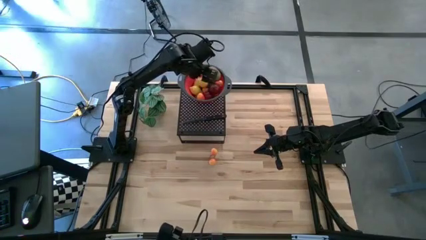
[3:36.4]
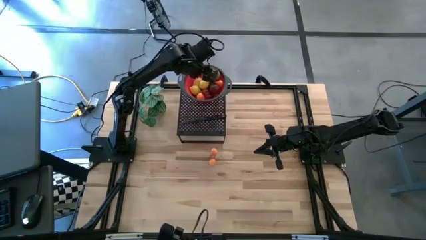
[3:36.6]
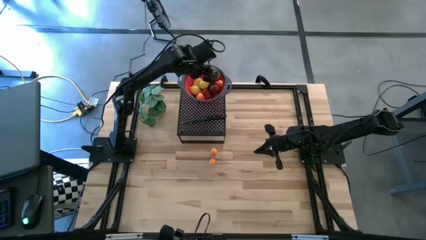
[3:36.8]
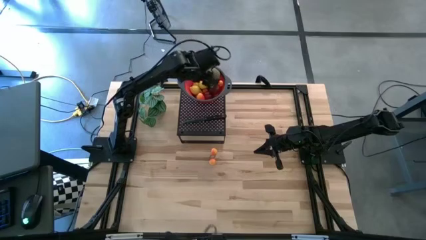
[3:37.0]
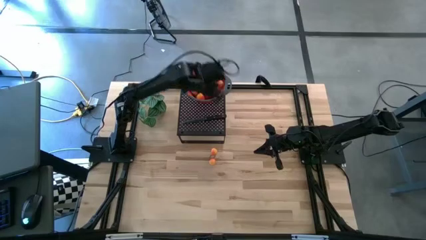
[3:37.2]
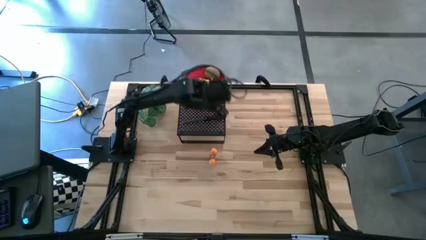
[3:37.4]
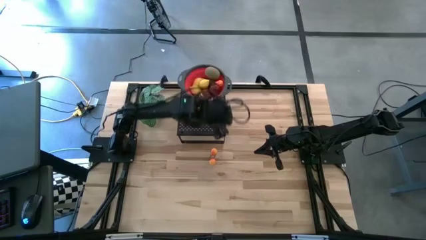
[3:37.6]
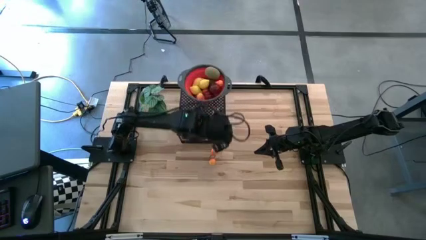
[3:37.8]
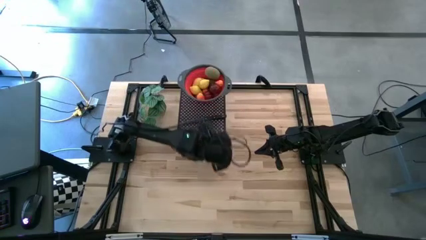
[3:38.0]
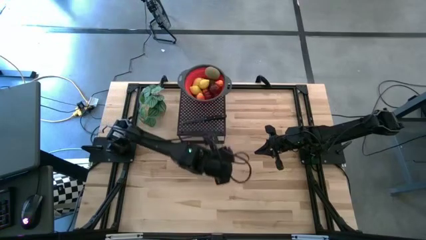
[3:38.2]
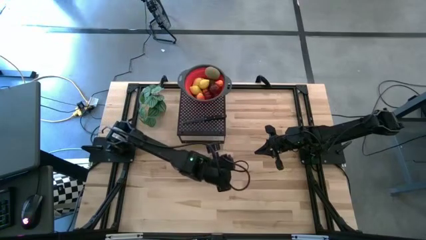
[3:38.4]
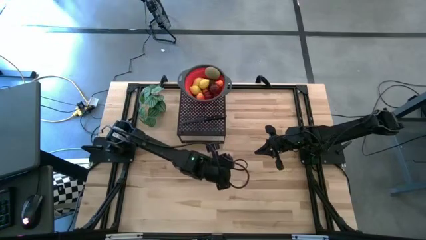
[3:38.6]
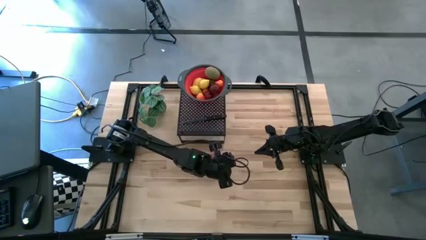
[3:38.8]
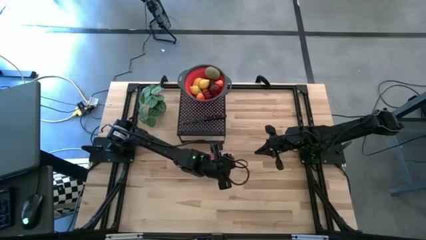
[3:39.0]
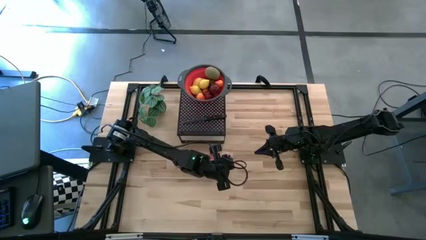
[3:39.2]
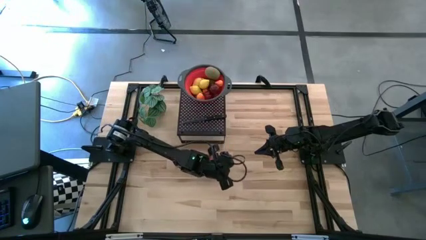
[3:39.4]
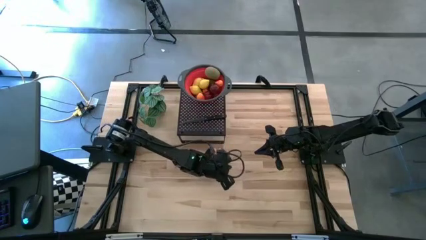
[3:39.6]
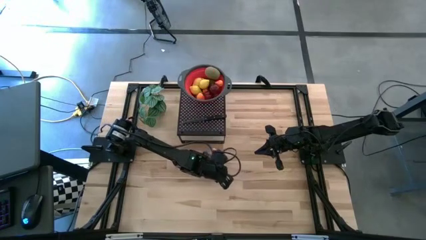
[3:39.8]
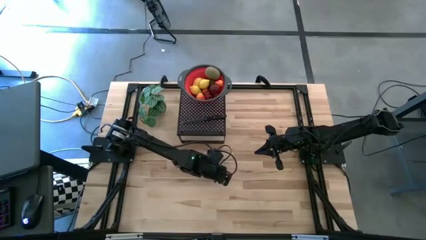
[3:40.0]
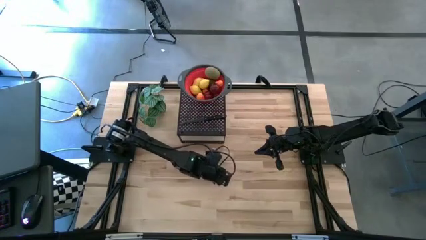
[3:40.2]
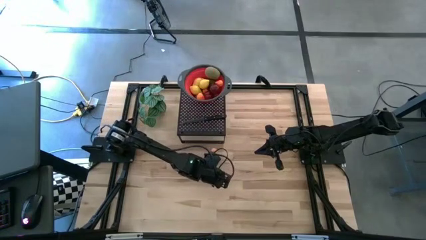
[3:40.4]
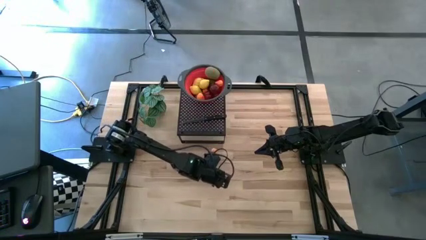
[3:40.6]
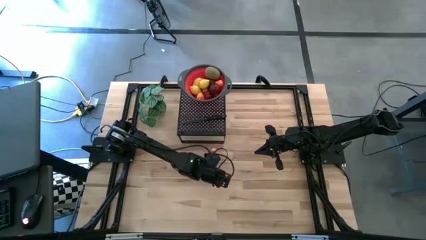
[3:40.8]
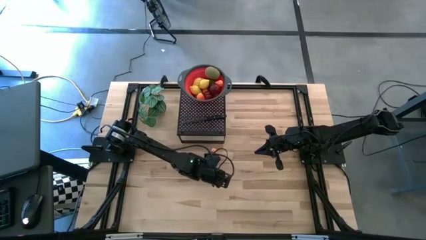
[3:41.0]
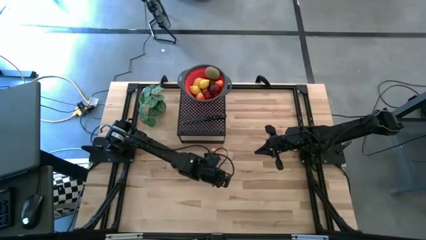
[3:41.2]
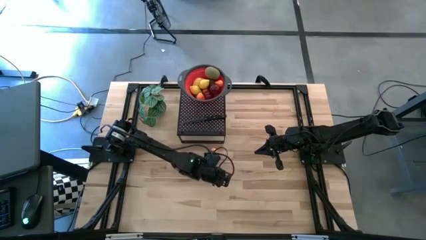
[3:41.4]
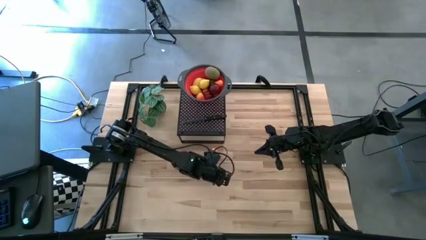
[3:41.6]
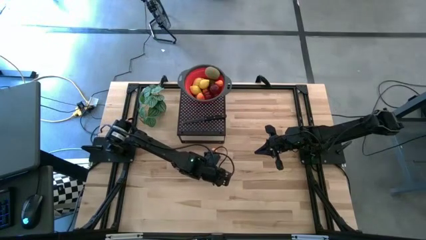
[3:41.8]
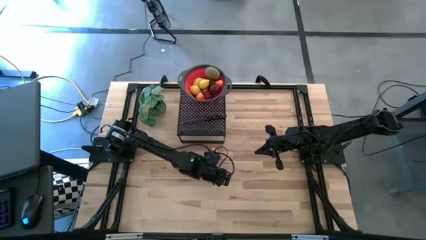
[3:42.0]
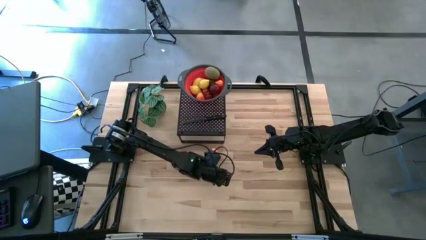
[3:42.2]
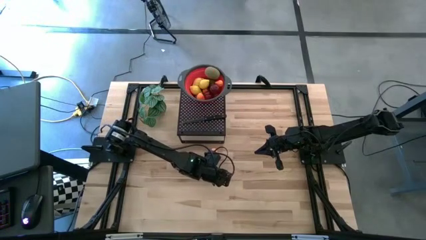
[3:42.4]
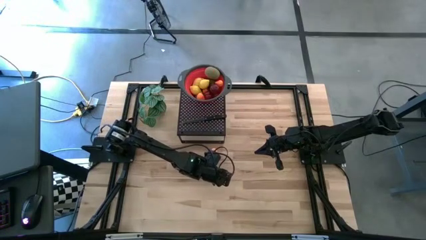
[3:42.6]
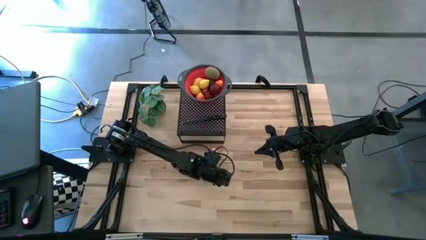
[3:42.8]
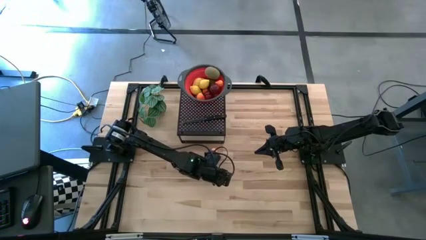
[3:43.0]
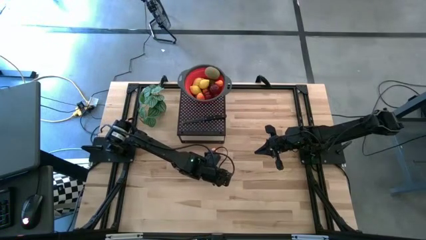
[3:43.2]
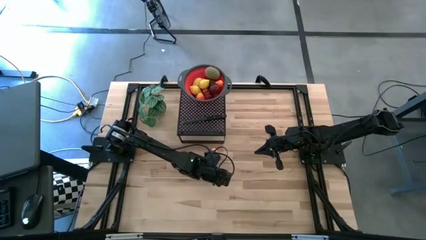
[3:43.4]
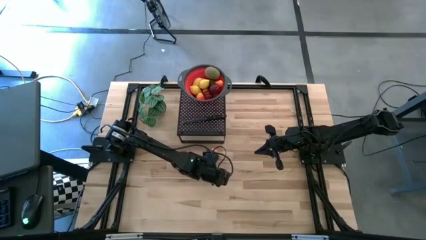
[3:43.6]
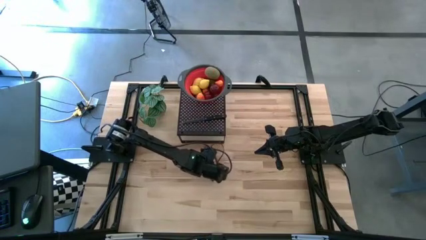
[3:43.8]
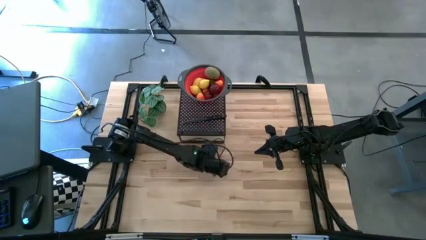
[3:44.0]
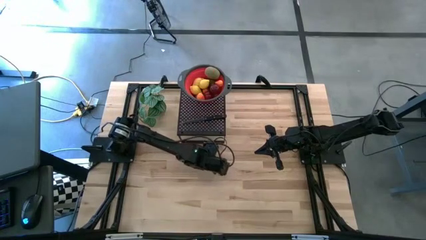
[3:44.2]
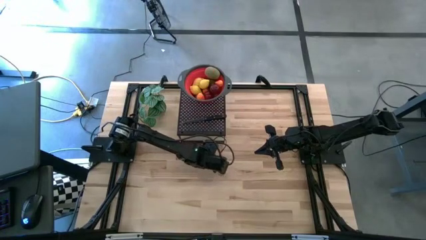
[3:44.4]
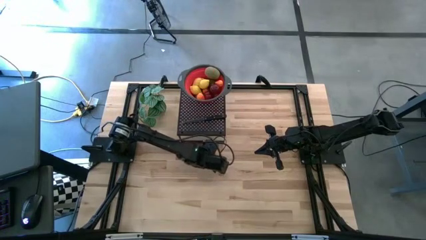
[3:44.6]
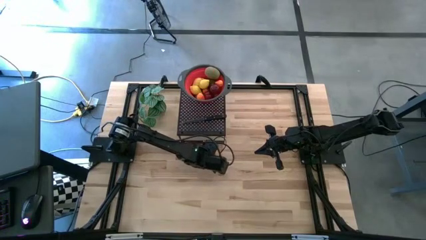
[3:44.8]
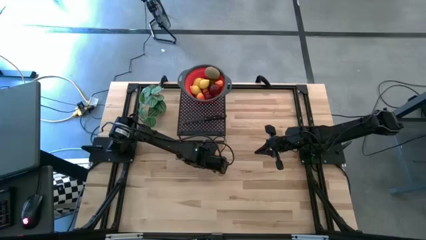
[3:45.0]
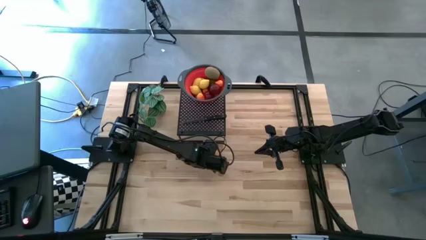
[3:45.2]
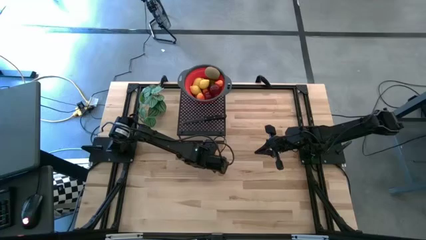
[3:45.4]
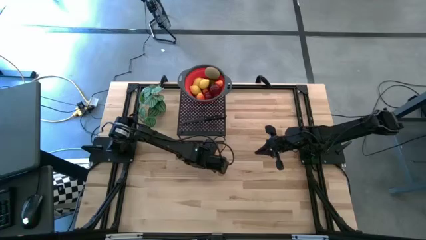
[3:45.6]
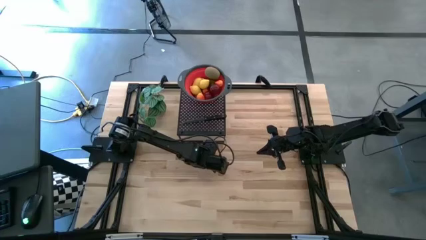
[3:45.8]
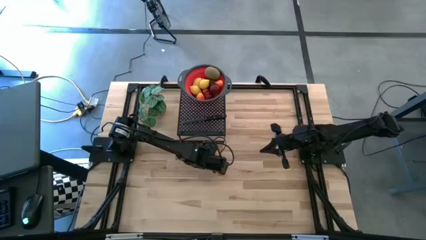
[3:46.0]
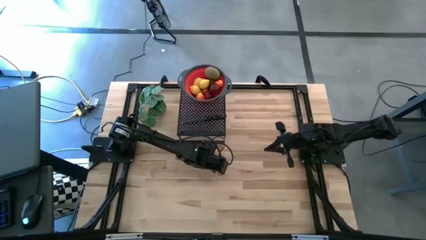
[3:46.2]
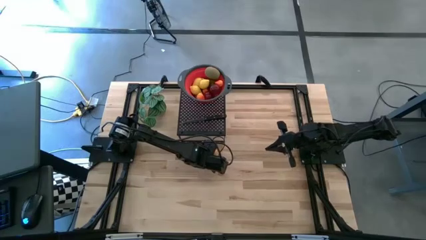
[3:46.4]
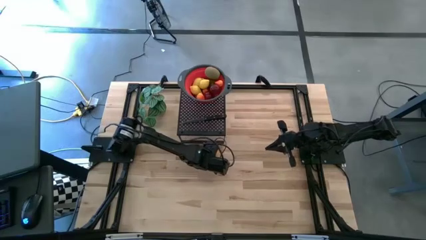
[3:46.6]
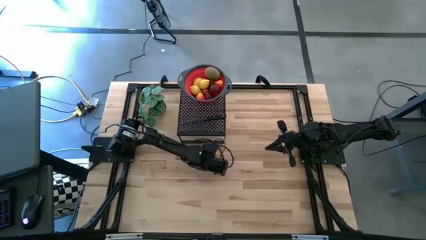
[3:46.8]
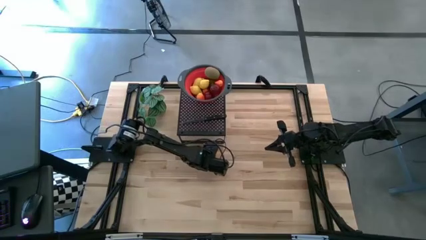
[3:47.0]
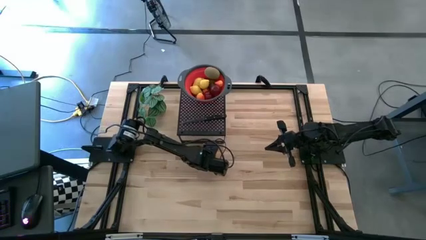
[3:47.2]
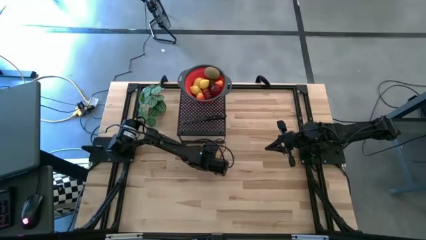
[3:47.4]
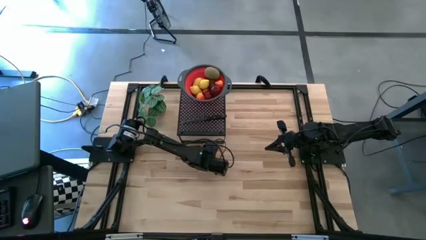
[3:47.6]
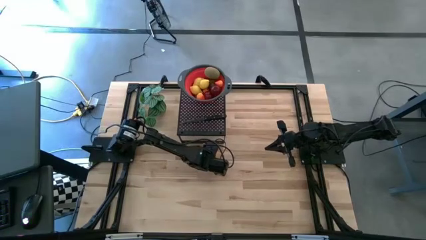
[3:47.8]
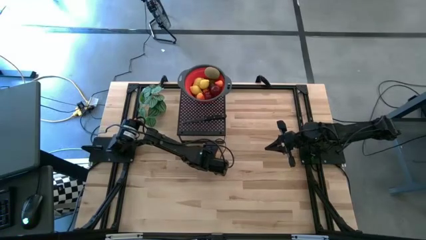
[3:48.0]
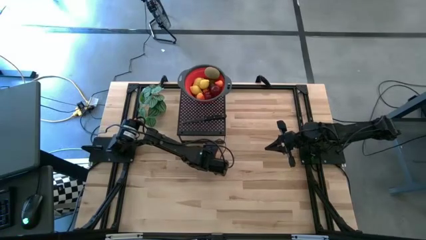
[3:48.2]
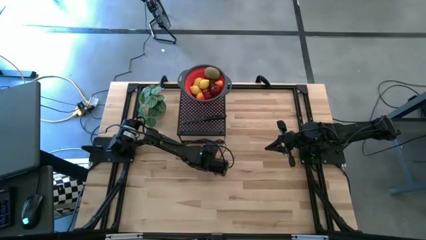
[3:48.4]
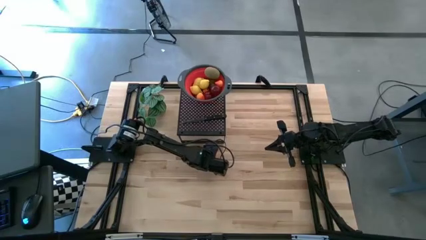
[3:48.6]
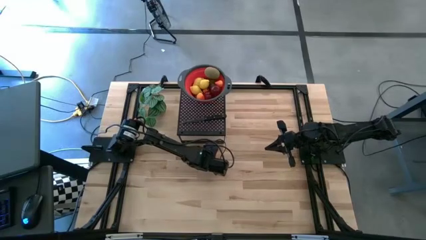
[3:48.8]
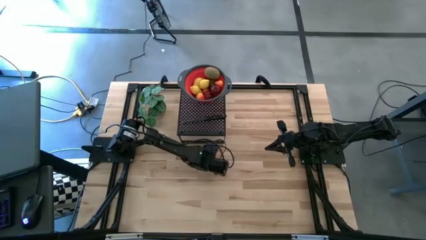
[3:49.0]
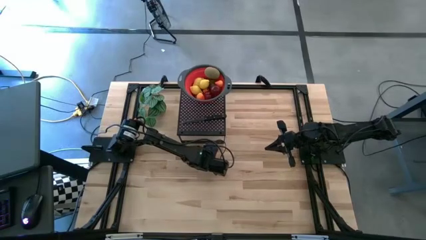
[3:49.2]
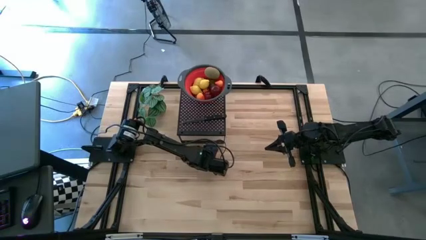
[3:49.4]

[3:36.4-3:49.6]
Task: Pick & Place Fruit
Put the pear into the red strainer bowl

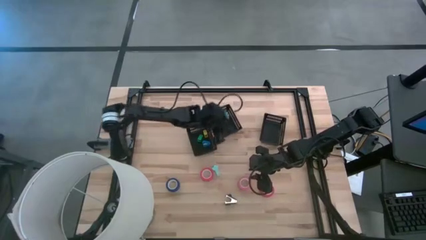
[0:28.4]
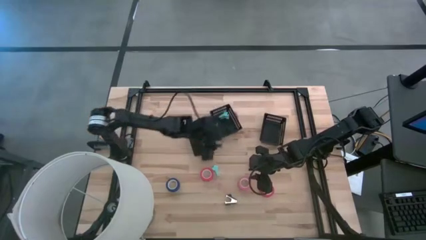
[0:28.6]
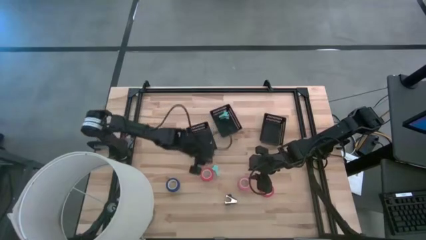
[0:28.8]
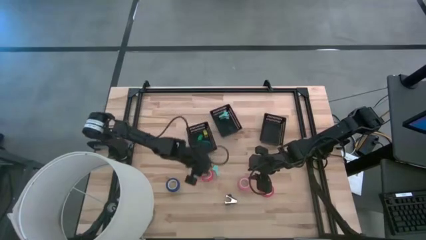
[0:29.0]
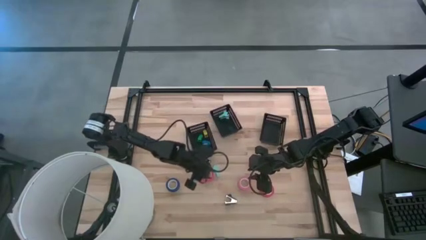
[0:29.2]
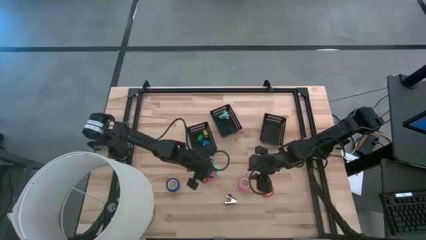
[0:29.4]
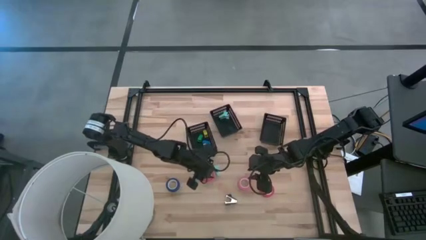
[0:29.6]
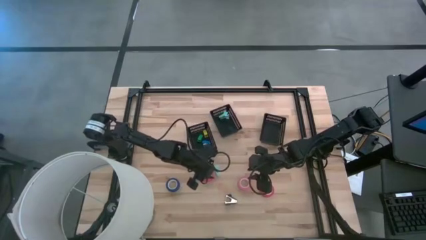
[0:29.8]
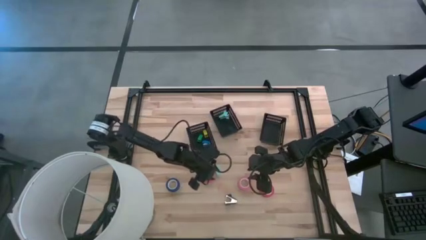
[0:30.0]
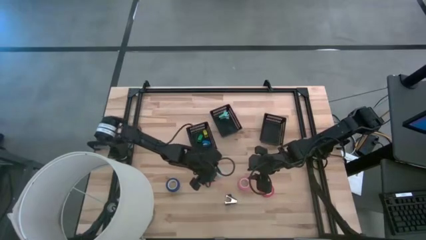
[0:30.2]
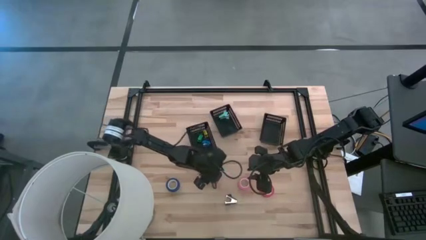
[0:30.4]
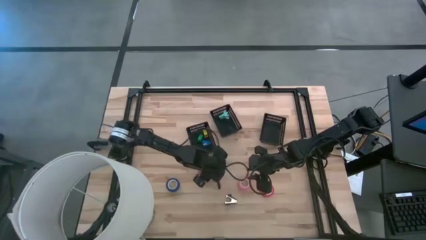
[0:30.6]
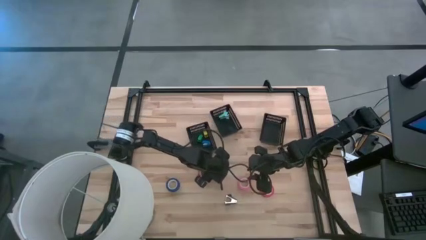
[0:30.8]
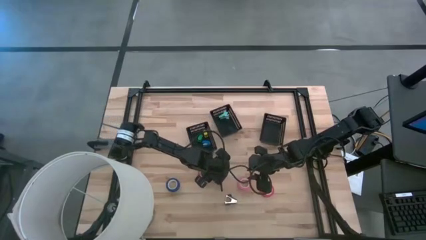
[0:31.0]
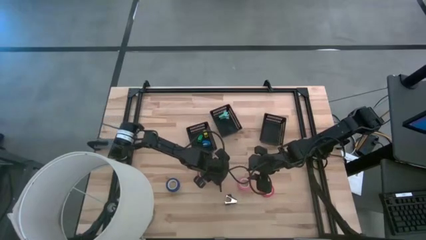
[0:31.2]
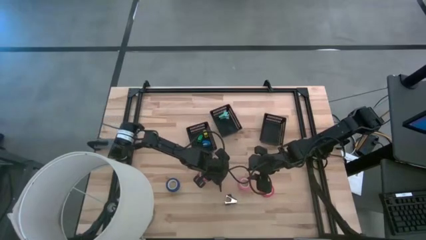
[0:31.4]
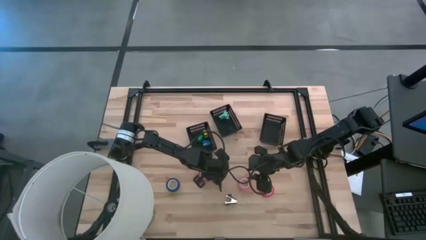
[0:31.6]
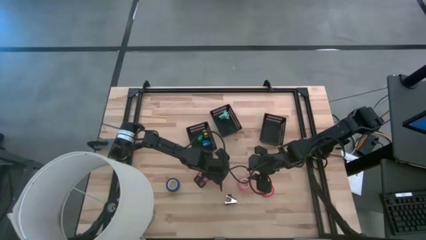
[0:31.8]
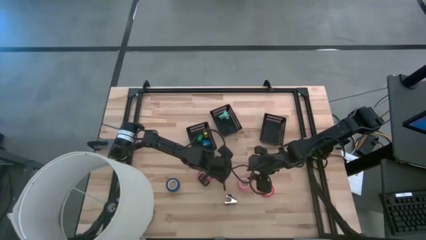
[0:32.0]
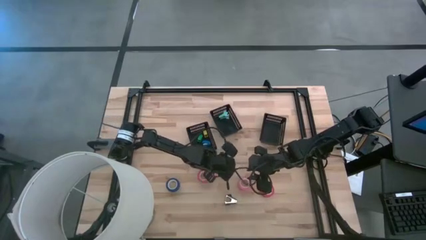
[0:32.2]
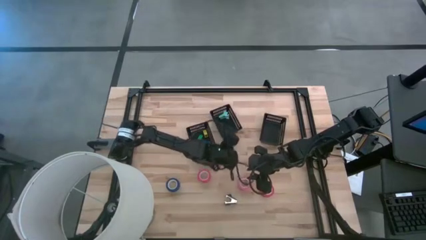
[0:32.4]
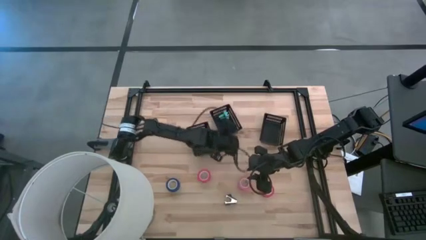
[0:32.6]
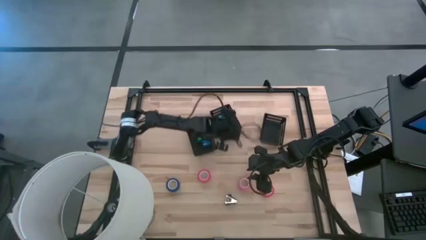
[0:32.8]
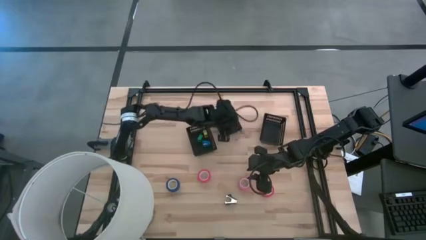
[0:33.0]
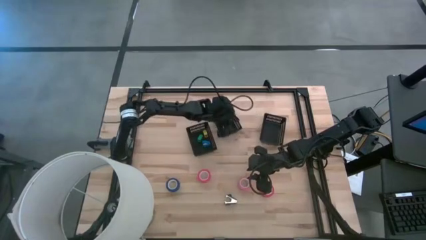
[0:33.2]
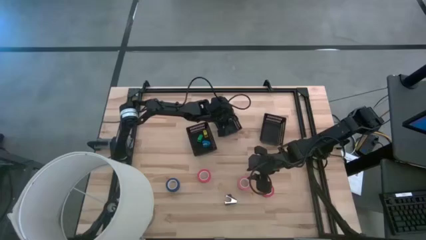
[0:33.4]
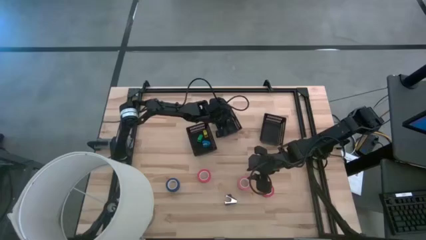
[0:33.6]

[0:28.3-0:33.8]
Task: Pick and place Stapler, Stapler remover, tape
Put the light blue staple remover into the middle black basket
